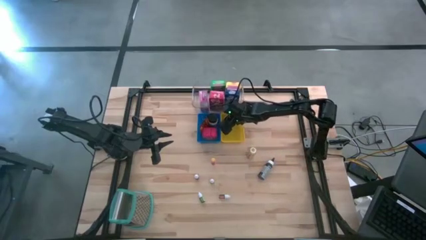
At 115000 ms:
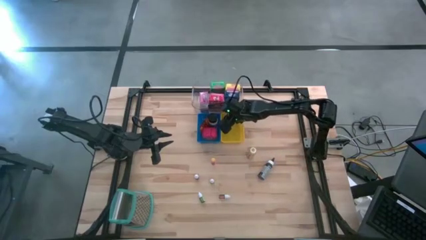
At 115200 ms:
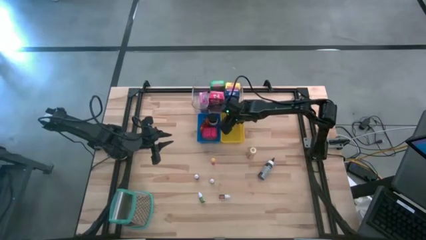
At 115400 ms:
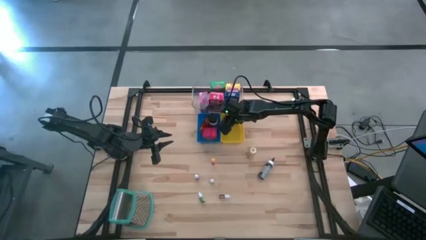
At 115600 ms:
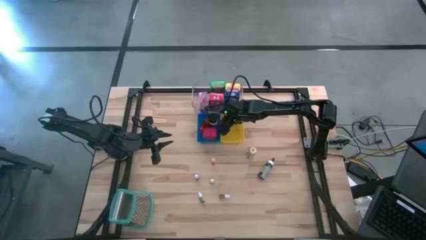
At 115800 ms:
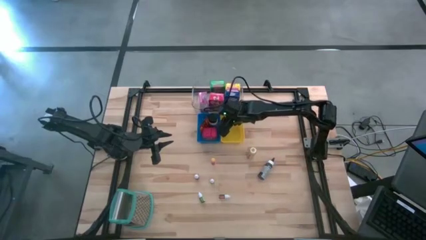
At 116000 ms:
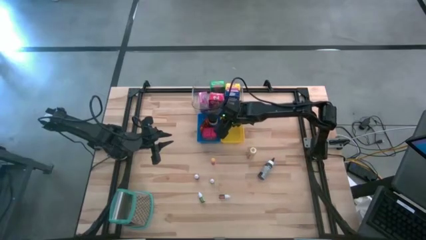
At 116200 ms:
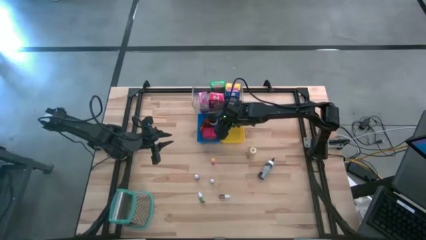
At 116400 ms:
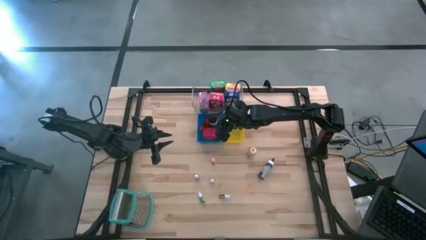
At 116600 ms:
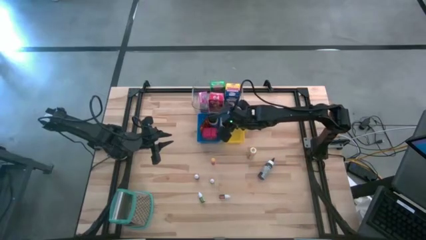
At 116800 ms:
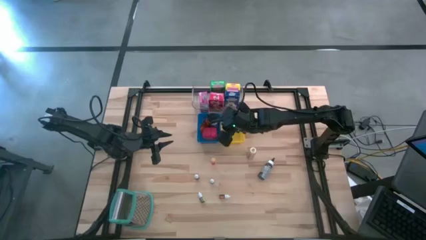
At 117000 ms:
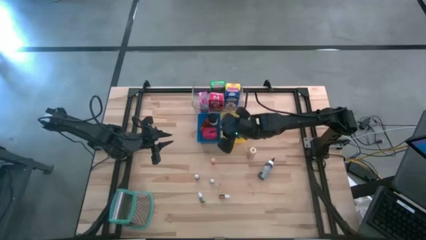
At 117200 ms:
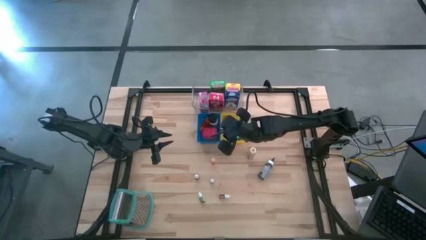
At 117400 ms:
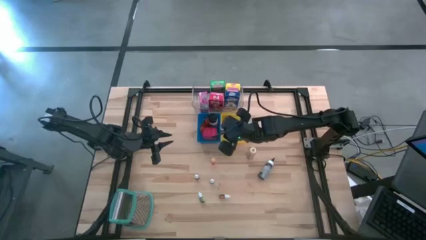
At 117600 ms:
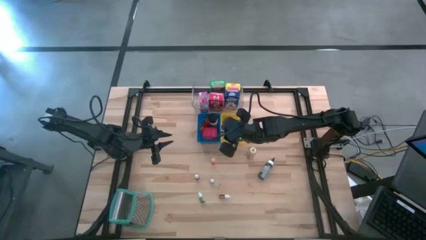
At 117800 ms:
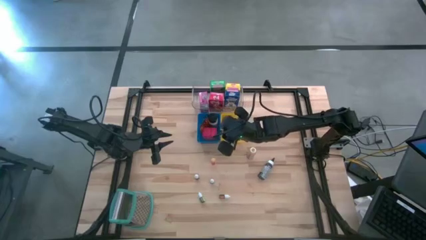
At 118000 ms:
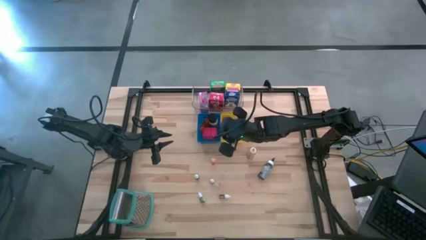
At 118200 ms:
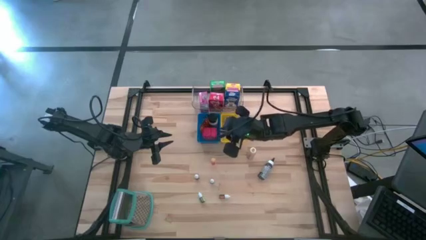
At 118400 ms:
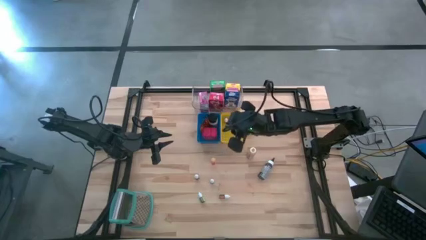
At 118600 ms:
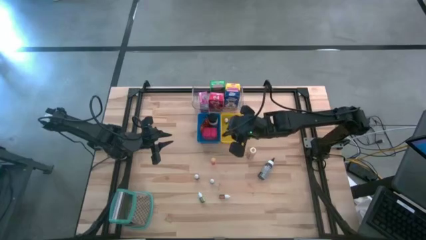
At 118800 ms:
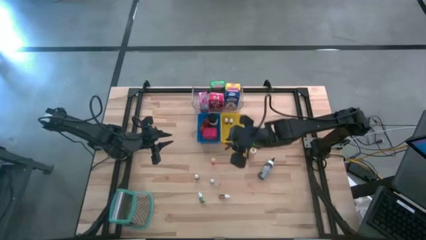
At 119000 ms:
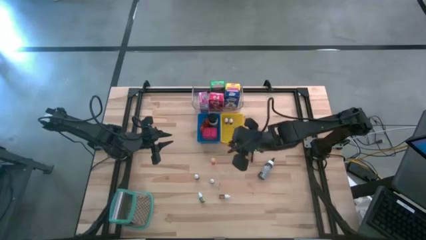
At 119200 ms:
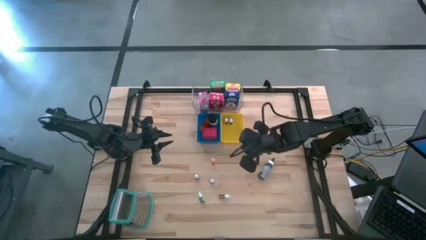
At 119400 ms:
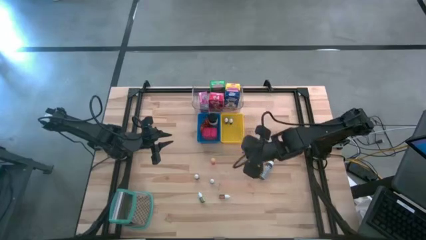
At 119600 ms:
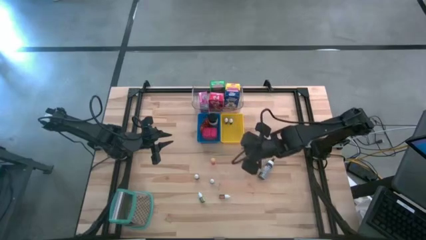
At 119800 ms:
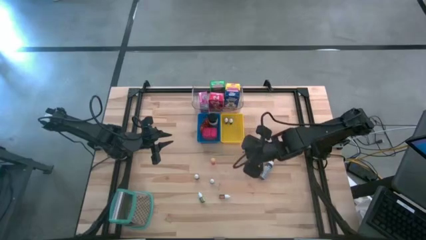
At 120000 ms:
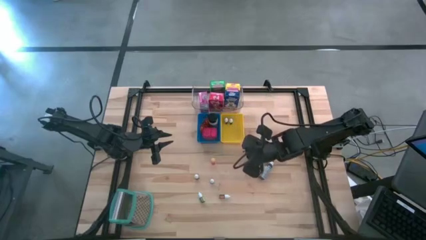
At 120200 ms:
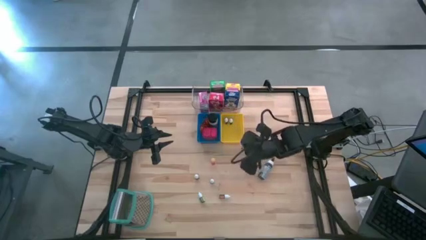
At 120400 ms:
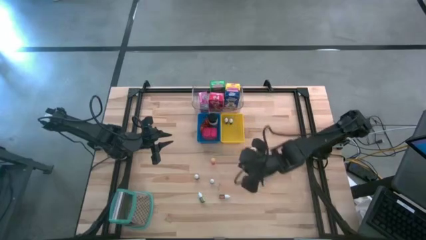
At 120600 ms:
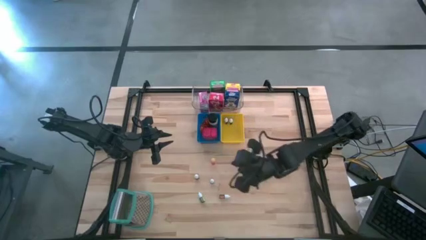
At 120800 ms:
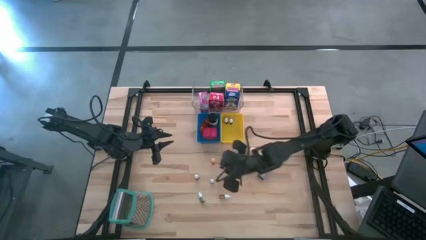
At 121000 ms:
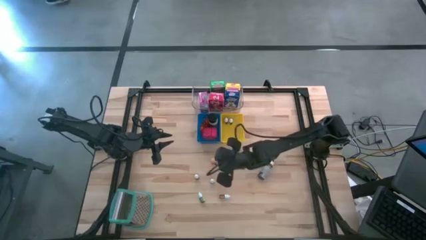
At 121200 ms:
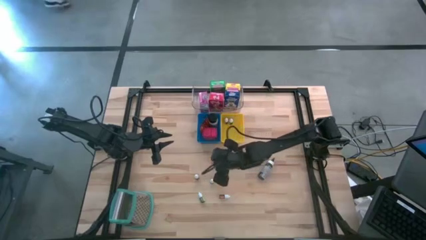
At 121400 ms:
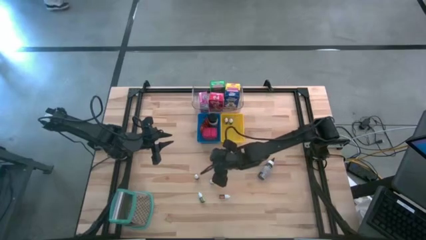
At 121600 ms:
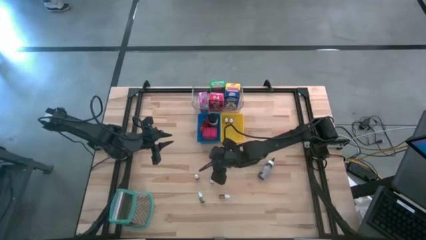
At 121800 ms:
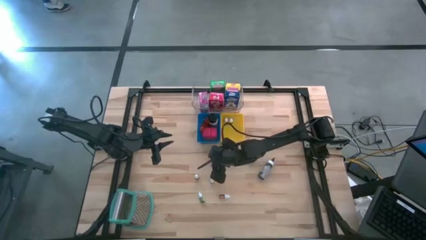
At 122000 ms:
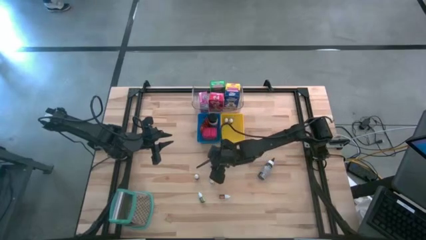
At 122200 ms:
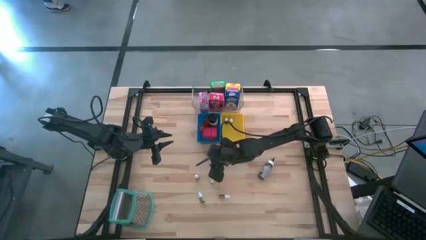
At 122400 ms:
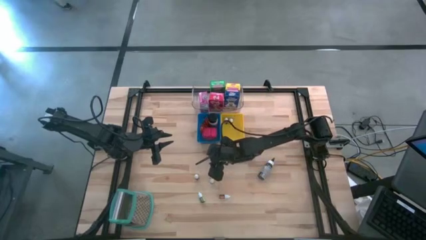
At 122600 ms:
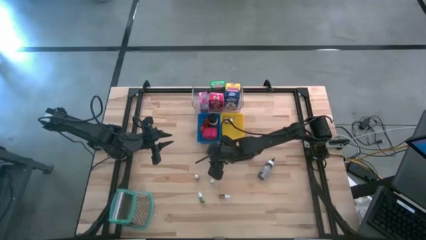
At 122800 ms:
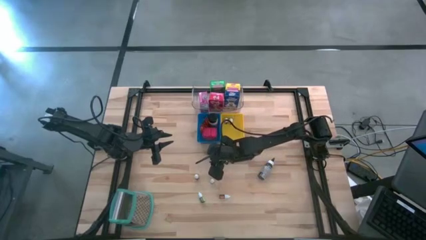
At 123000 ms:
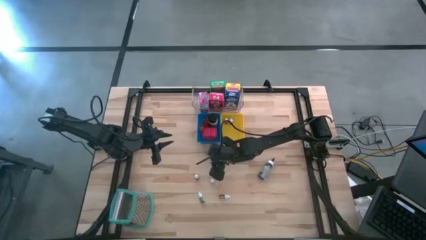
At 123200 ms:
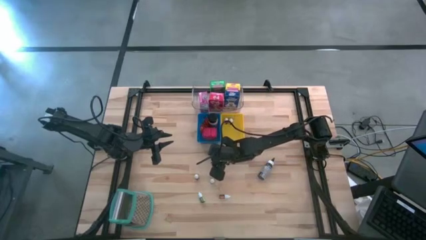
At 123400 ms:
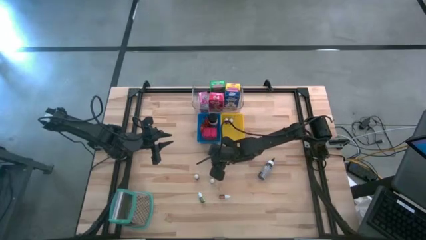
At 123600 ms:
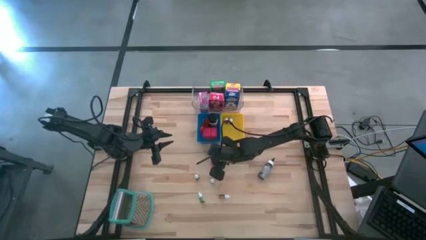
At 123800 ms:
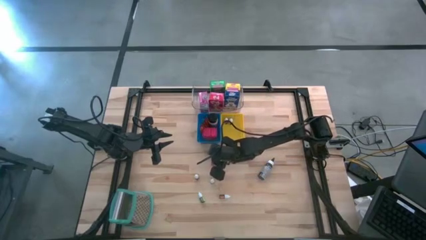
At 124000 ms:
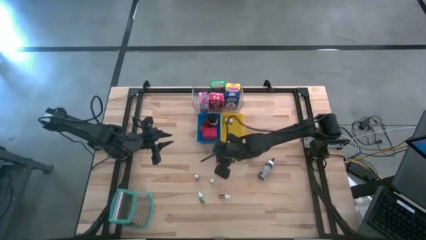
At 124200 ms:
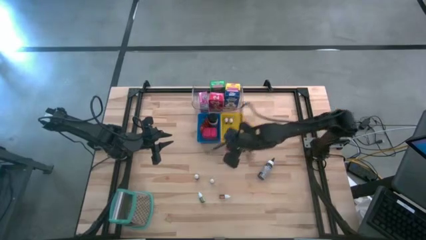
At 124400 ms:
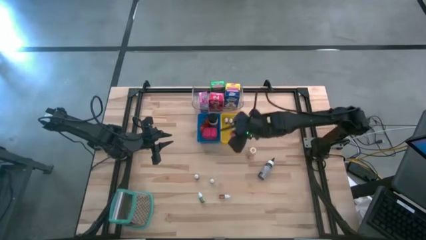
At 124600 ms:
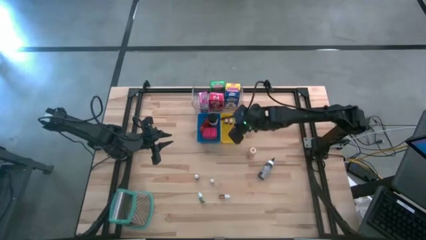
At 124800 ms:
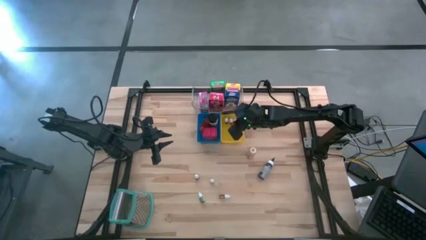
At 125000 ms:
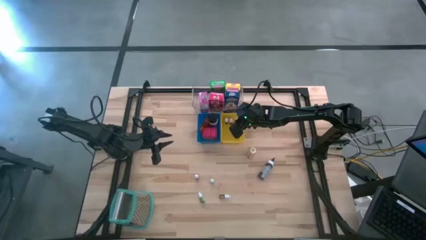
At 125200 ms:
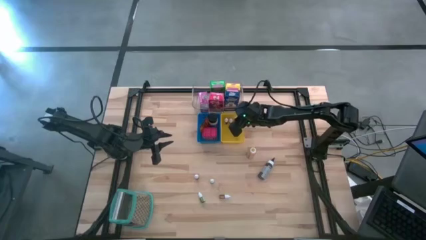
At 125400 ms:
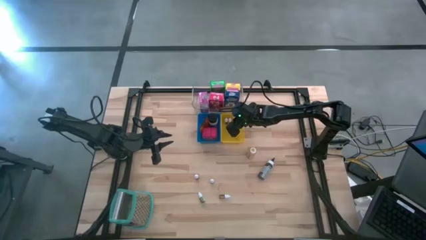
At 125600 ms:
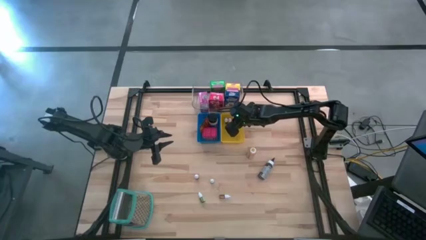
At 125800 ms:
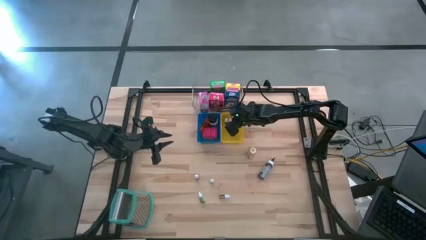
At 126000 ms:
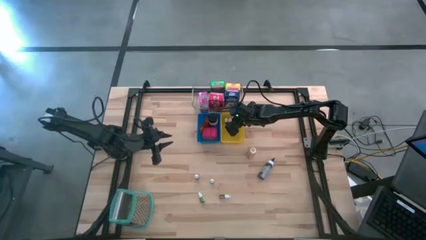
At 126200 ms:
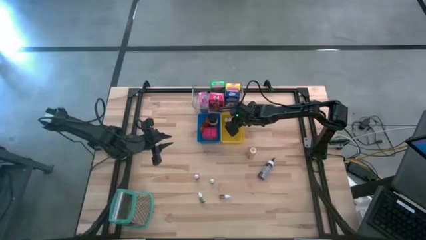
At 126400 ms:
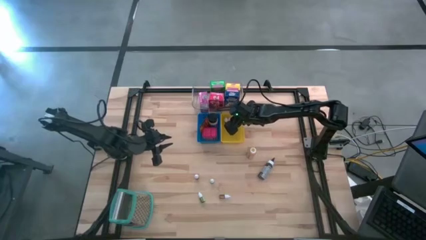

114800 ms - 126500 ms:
Task: Pick & Place Kitchen Items
Put the small orange food coloring bottle into the yellow bin

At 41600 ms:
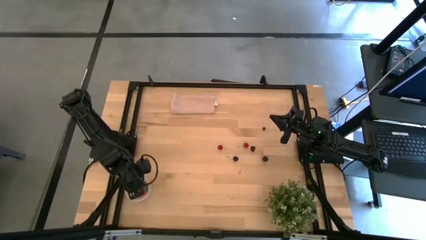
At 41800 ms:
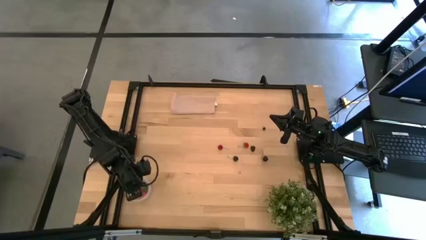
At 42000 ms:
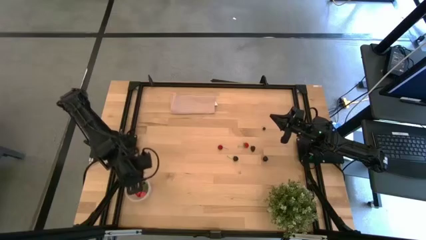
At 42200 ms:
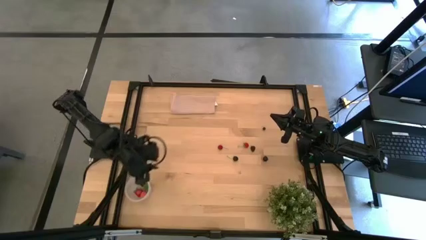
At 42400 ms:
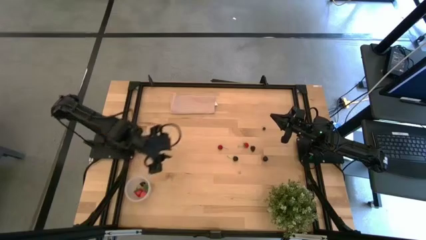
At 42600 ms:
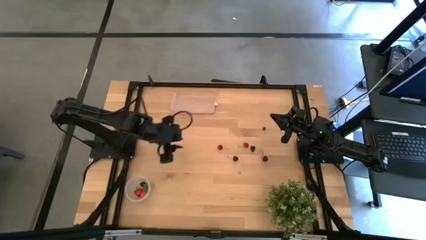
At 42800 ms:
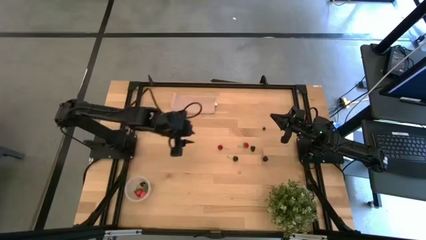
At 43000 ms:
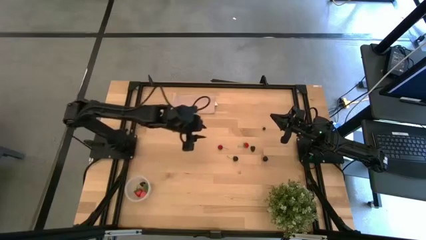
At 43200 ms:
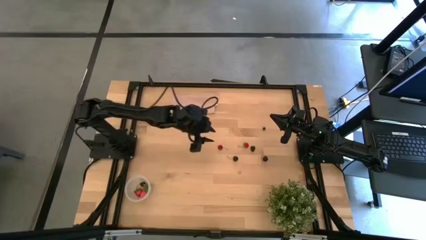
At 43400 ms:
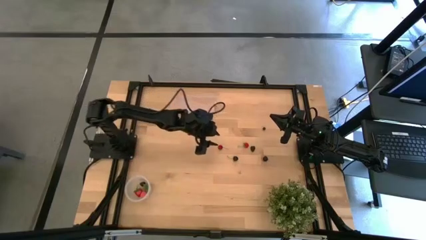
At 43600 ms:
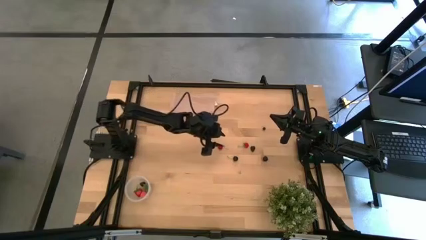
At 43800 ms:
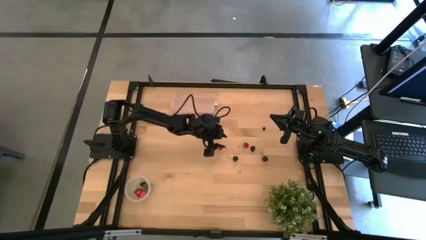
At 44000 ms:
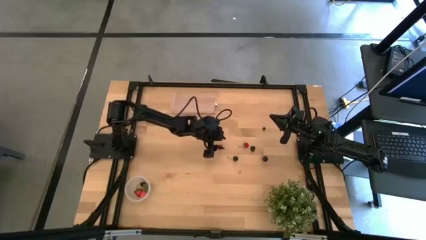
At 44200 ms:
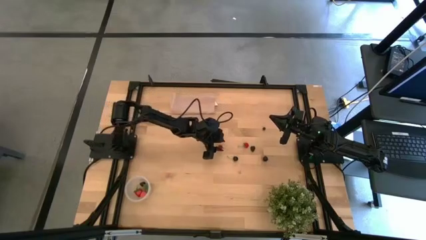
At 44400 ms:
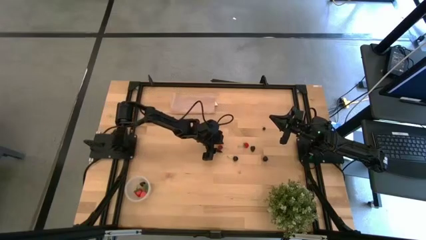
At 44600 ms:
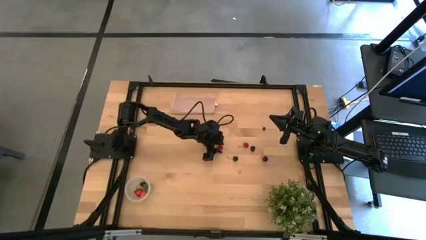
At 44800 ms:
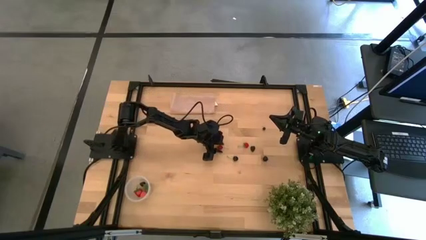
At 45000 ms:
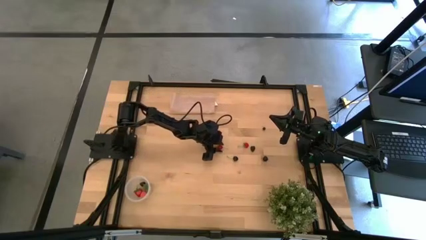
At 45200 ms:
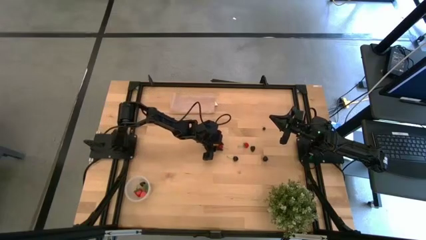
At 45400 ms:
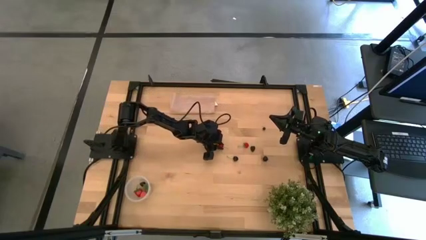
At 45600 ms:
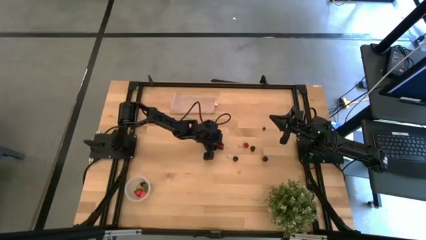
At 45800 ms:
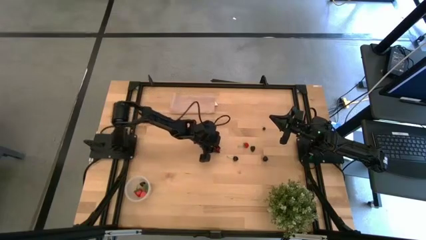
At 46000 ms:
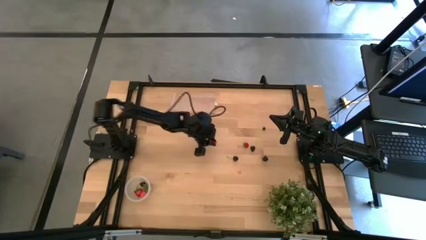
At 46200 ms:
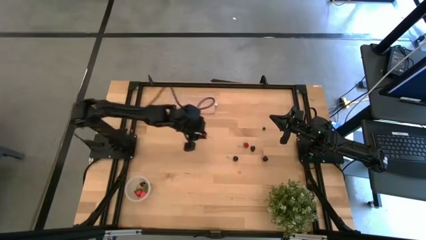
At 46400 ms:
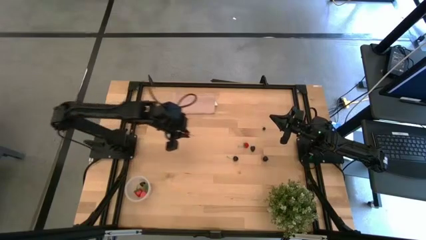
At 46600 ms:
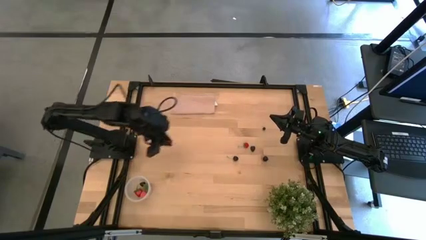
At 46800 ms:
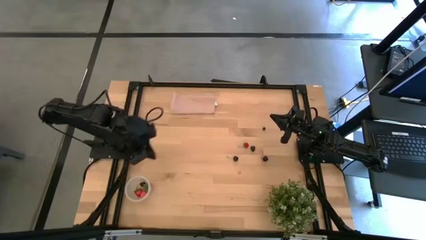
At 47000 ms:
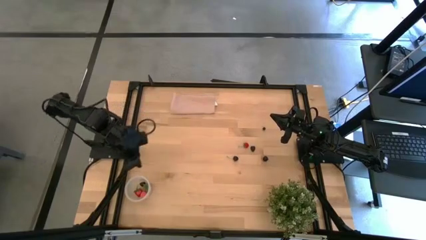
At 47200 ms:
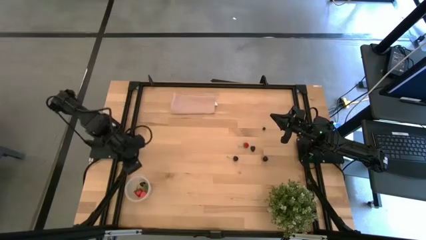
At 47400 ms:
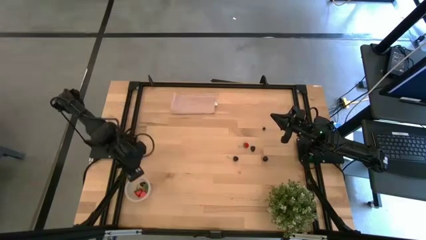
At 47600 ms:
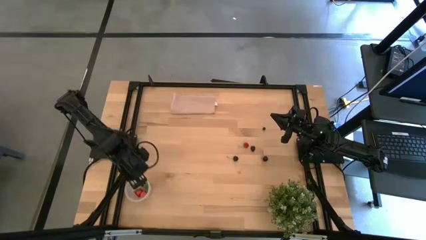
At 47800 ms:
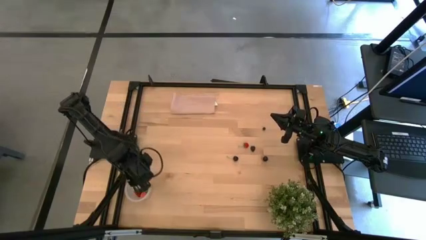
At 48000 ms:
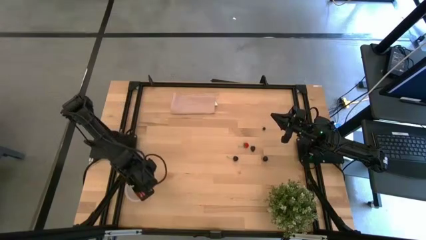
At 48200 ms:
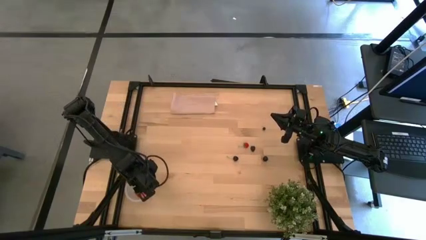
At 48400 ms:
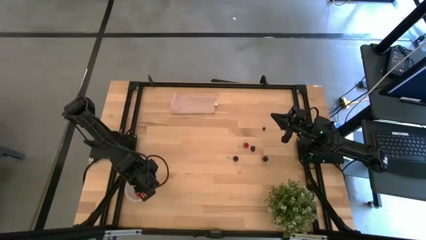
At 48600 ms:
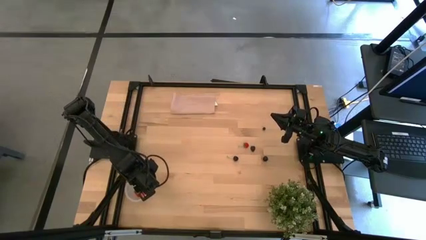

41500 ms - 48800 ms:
Task: Pick and placing Produce into tupperware
Put the red cherry into the transparent bin
